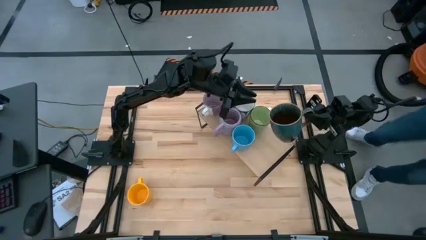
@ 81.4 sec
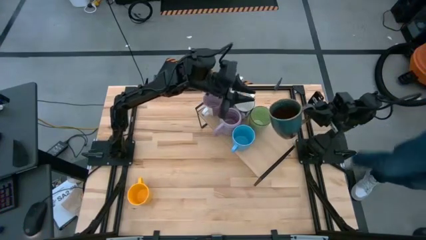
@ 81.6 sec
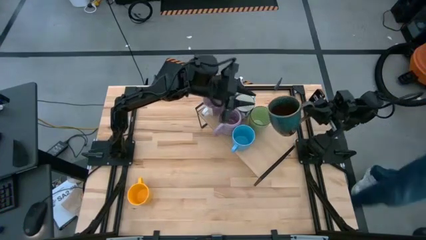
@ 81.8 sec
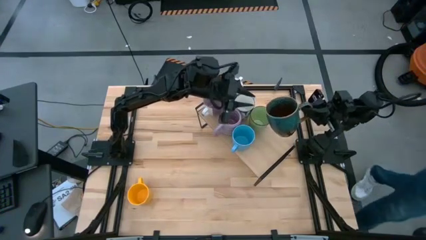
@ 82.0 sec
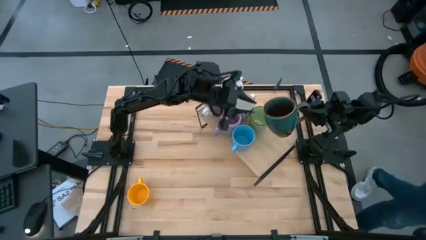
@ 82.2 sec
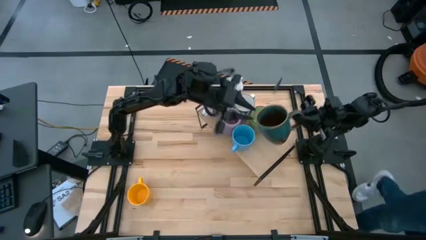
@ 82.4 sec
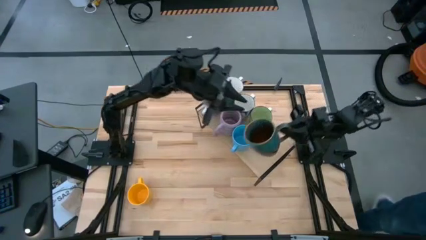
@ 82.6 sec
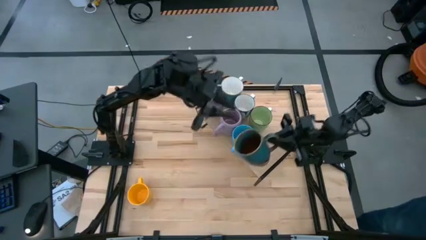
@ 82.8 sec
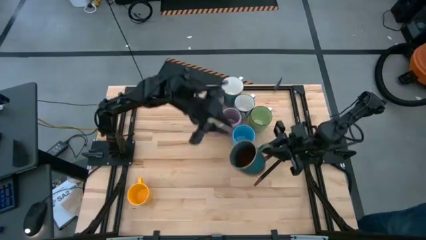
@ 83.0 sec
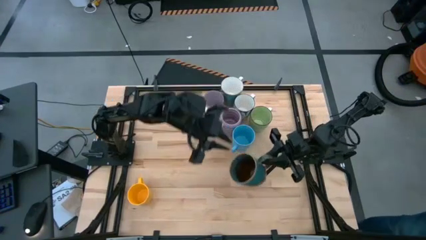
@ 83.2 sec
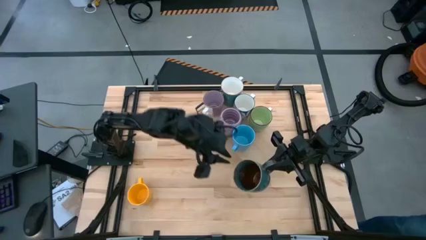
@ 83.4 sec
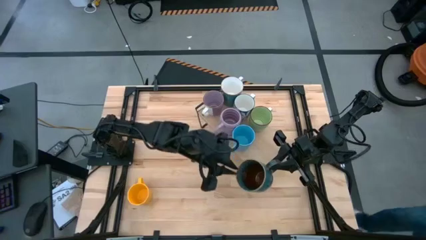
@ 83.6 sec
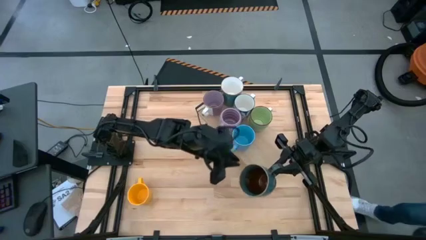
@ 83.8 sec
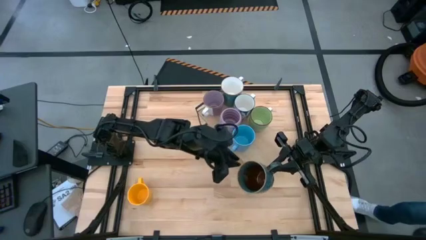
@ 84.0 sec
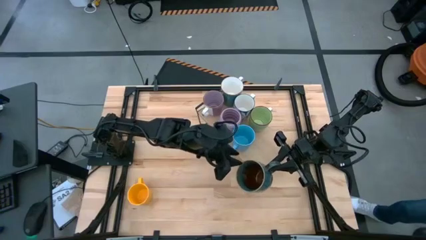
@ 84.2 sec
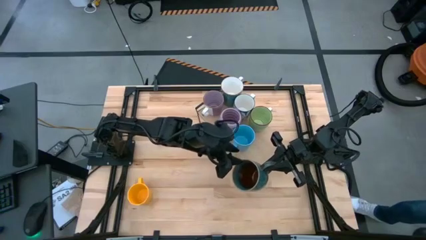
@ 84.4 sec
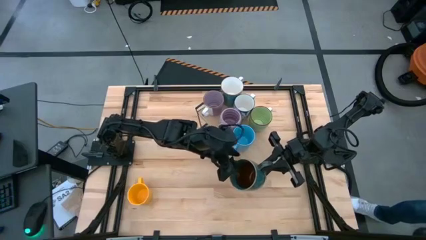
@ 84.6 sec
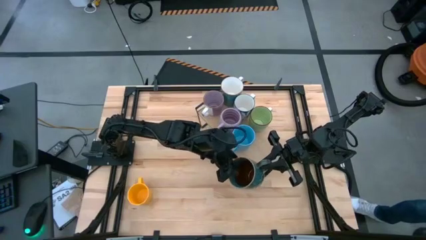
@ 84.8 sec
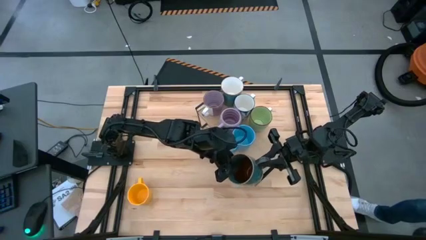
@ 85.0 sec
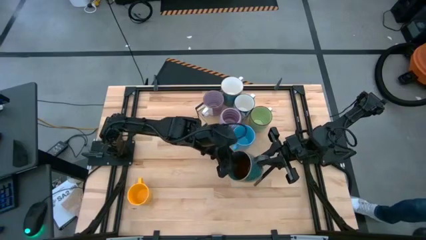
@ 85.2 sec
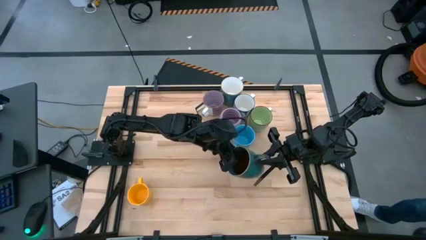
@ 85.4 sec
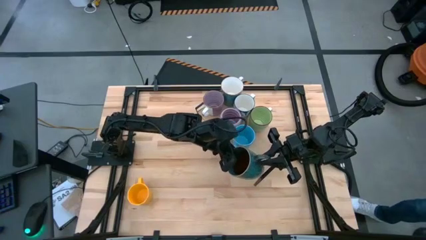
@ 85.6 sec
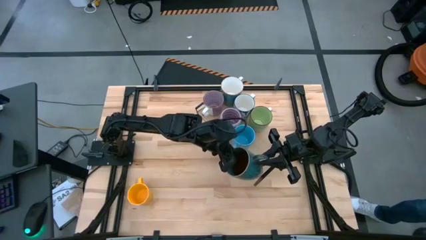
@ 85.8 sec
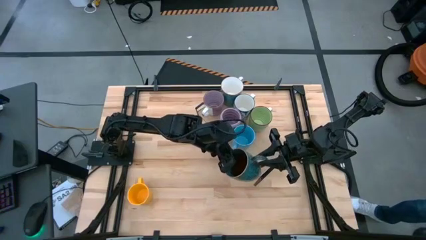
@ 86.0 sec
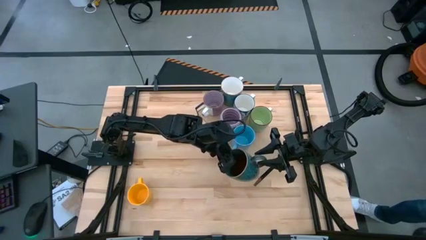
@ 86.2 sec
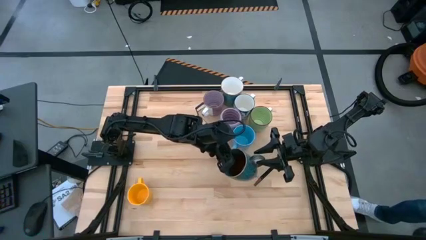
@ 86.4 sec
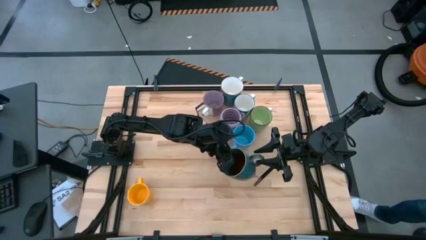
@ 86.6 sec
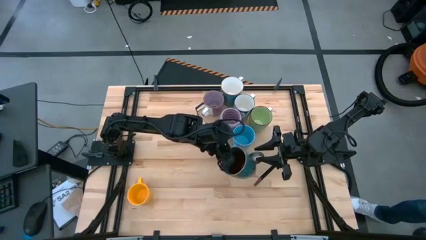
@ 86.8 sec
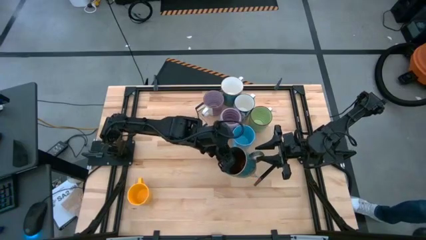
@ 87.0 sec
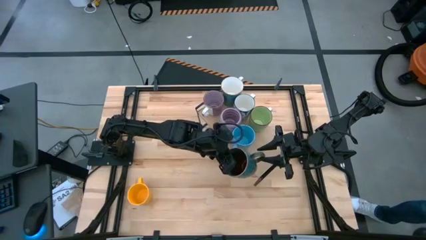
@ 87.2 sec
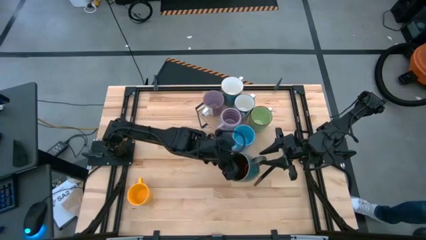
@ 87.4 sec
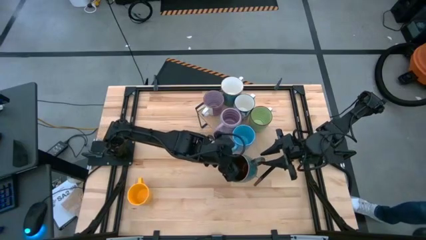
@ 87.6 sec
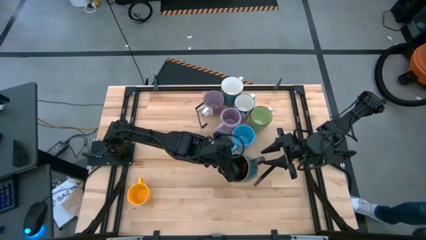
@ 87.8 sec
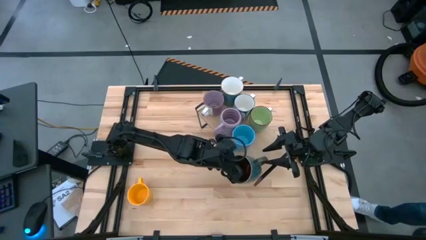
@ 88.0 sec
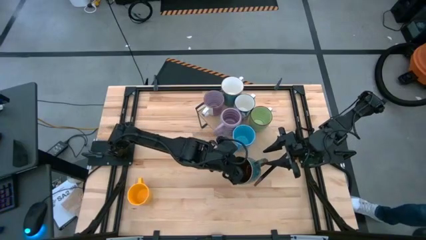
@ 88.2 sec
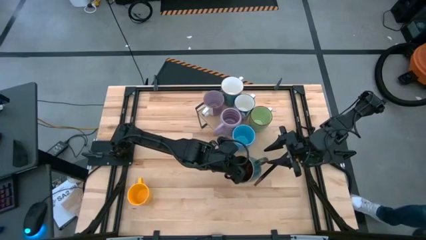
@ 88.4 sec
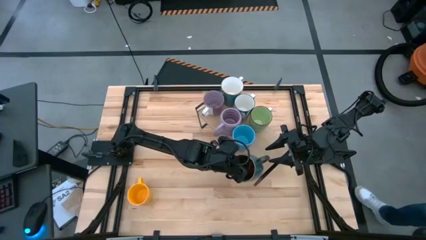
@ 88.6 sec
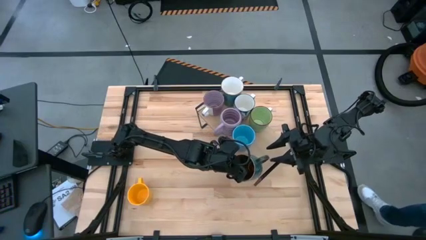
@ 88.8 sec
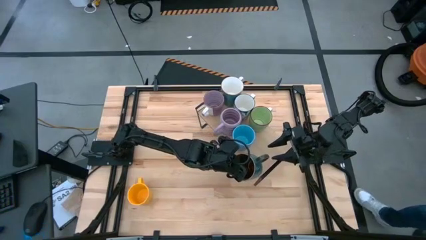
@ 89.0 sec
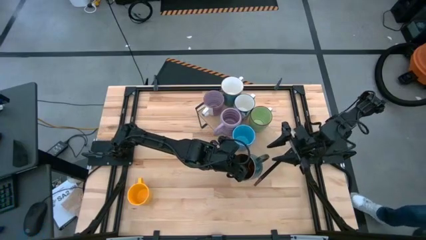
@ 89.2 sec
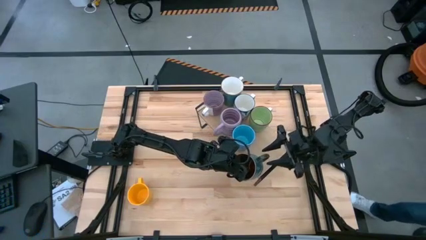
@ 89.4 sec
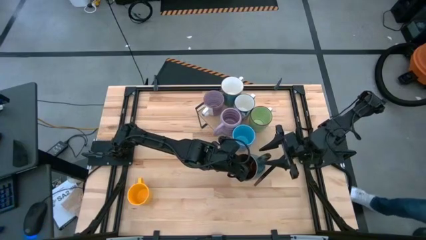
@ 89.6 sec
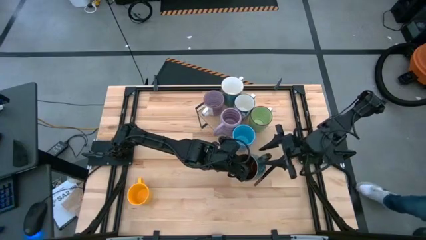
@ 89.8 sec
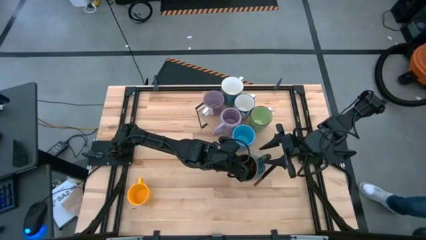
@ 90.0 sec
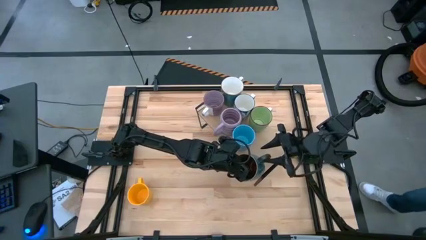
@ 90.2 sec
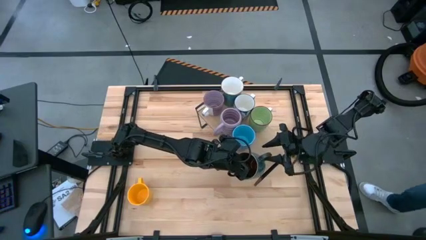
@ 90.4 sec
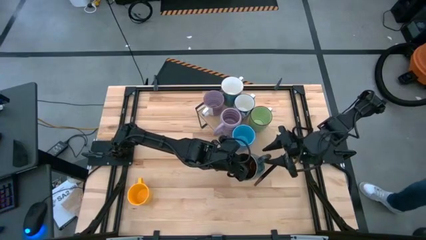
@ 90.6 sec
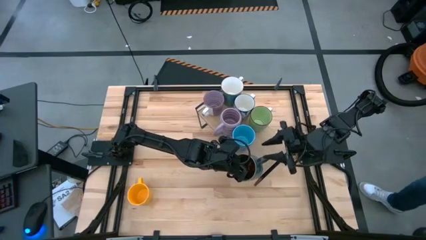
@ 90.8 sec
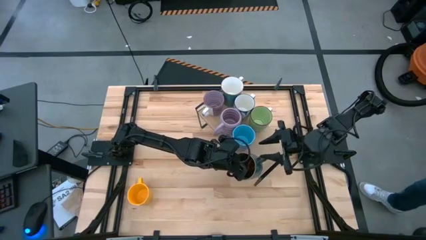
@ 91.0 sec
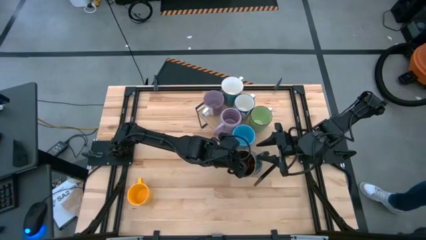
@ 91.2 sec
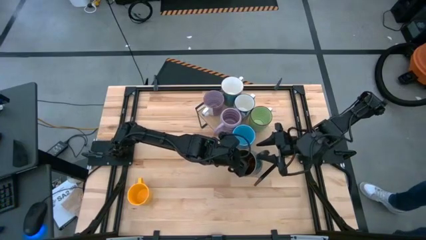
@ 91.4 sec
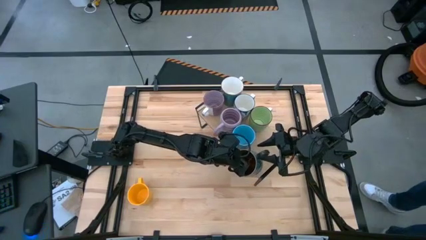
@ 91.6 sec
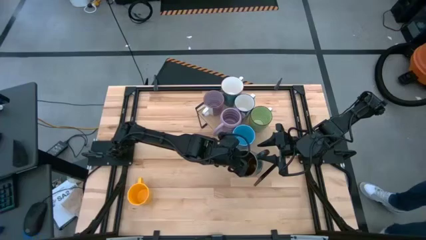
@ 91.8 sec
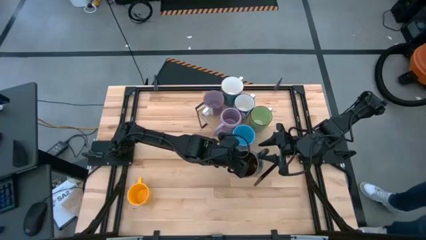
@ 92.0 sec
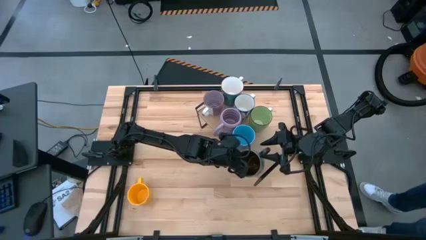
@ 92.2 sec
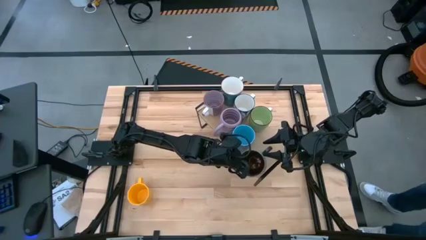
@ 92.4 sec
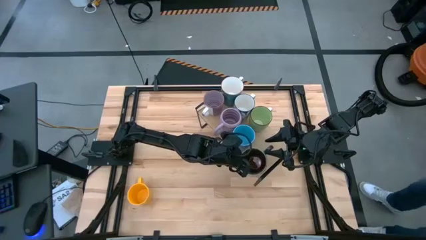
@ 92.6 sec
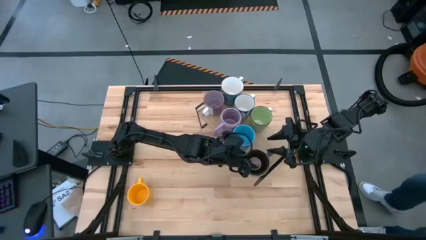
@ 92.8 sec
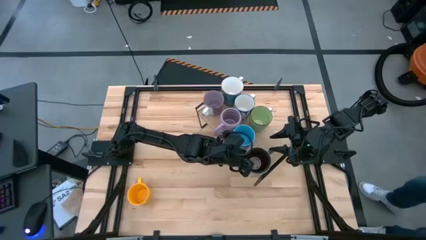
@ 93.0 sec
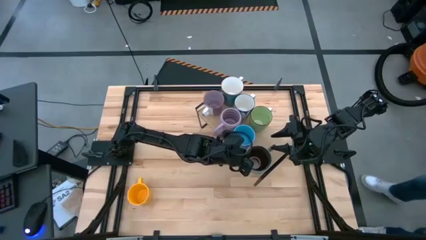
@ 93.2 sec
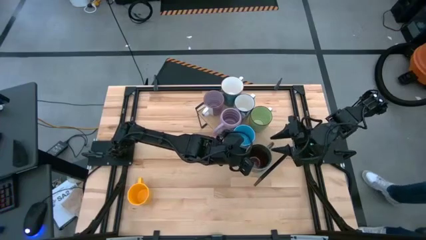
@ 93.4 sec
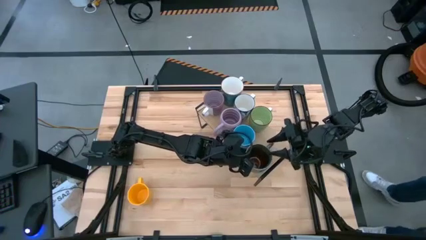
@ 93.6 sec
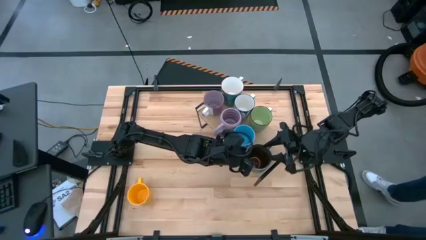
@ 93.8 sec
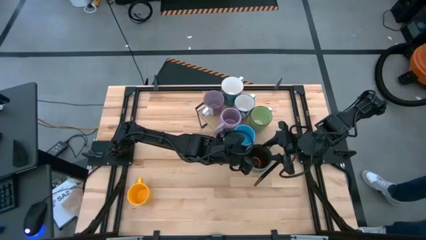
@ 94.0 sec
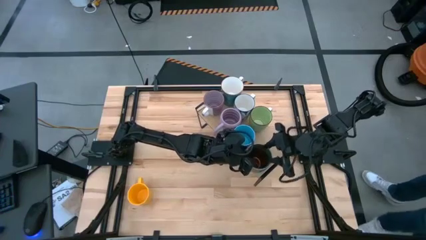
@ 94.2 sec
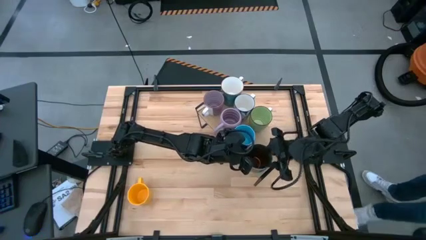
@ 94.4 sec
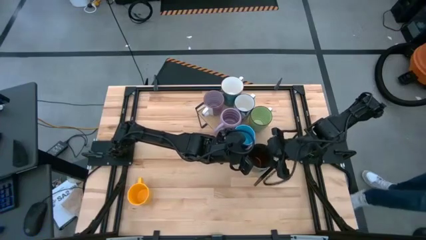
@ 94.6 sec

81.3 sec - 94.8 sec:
Task: Place coffee mugs
Put the brown mug on the shelf
